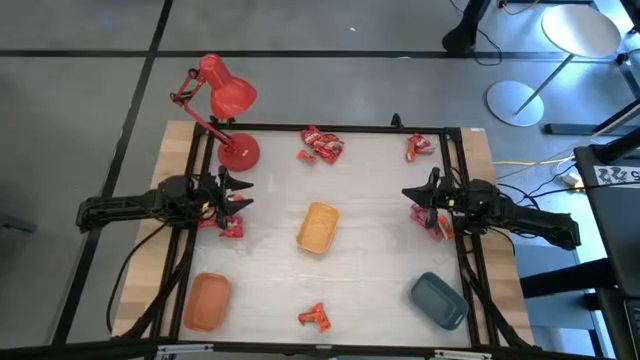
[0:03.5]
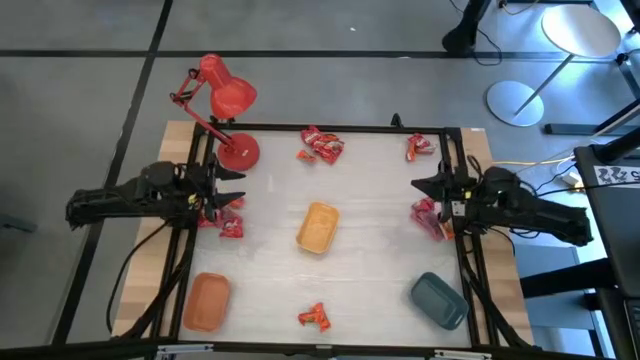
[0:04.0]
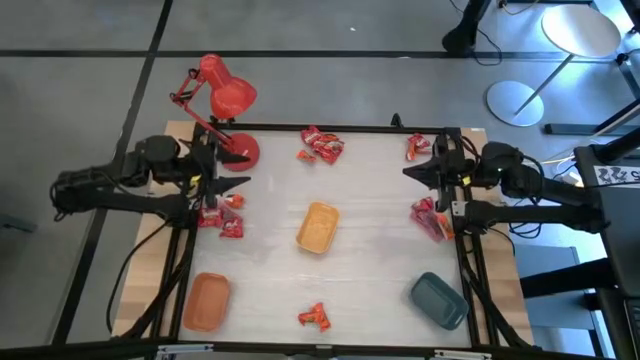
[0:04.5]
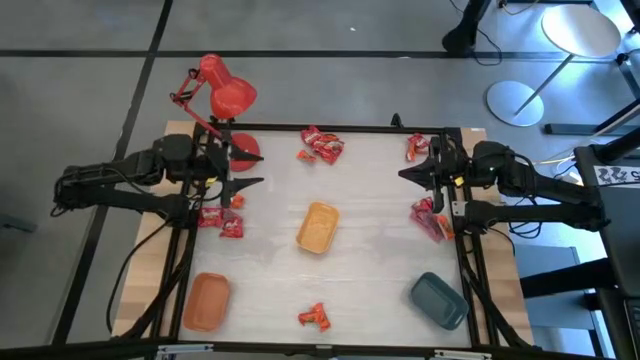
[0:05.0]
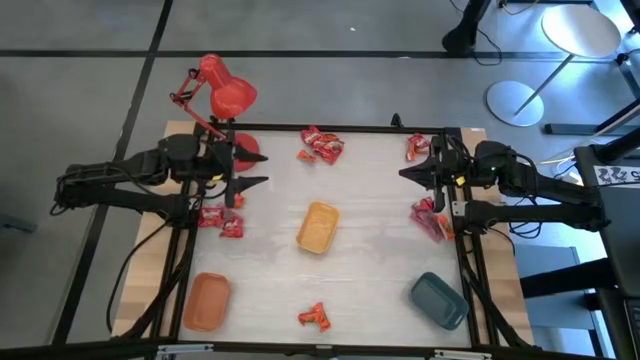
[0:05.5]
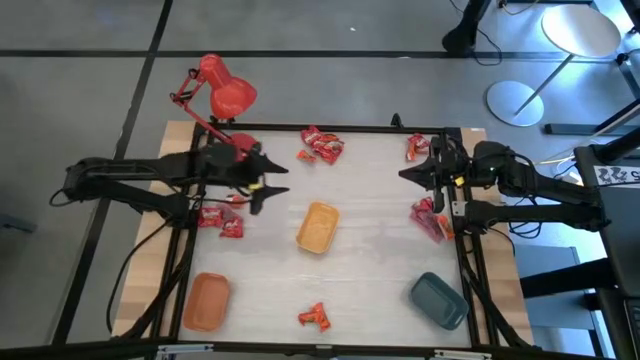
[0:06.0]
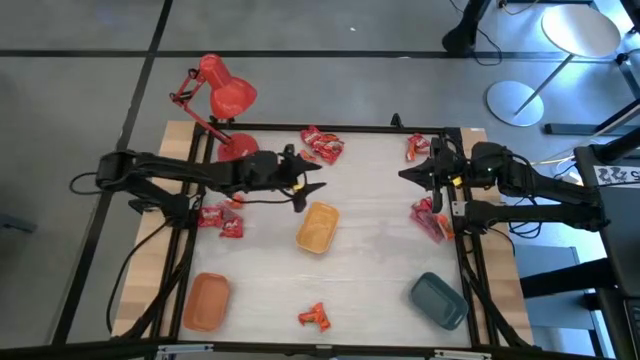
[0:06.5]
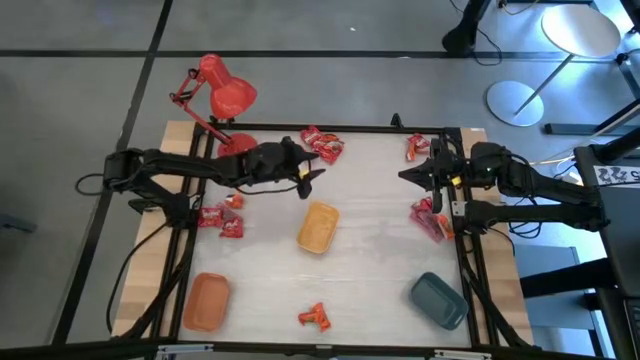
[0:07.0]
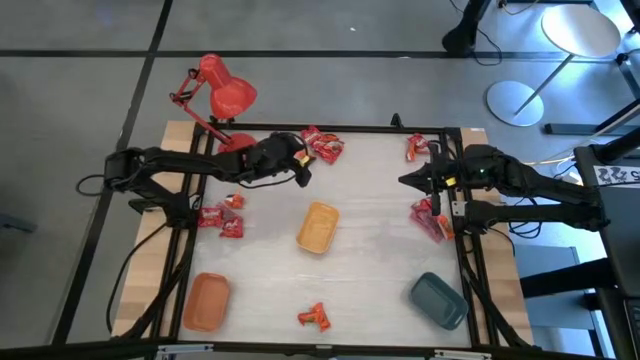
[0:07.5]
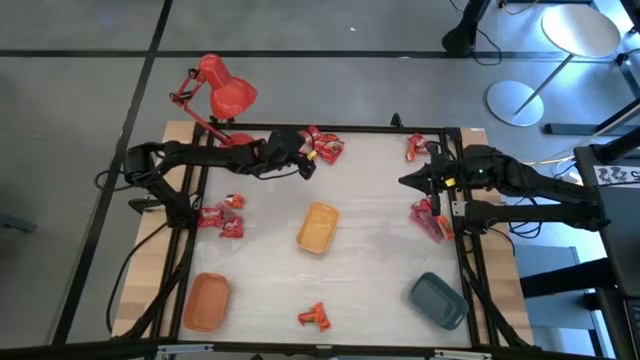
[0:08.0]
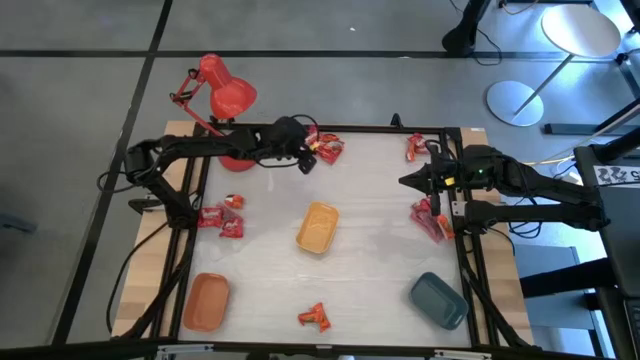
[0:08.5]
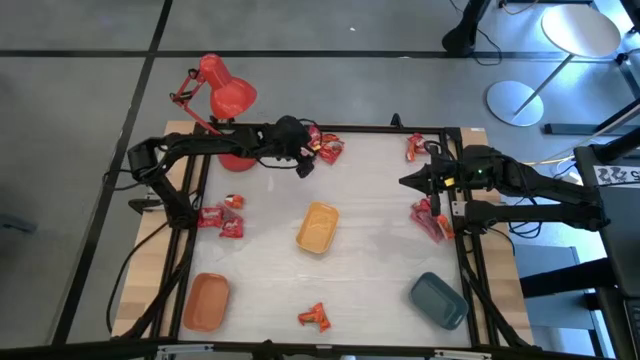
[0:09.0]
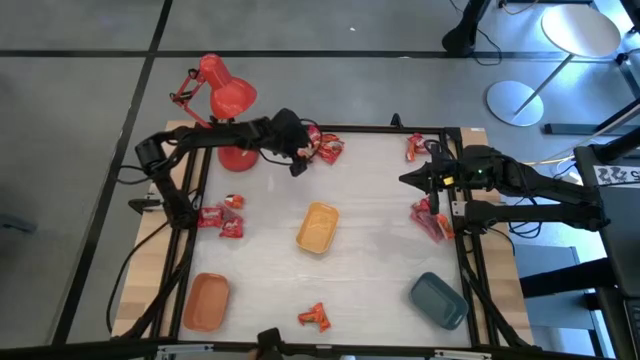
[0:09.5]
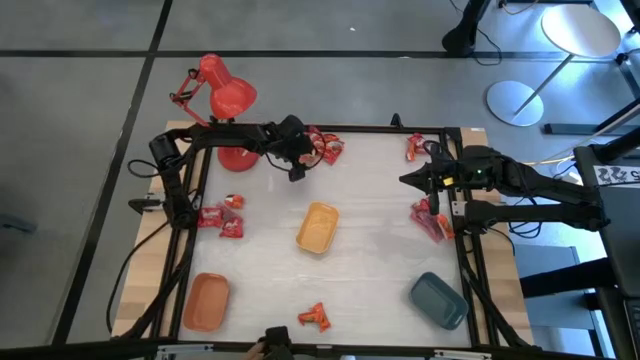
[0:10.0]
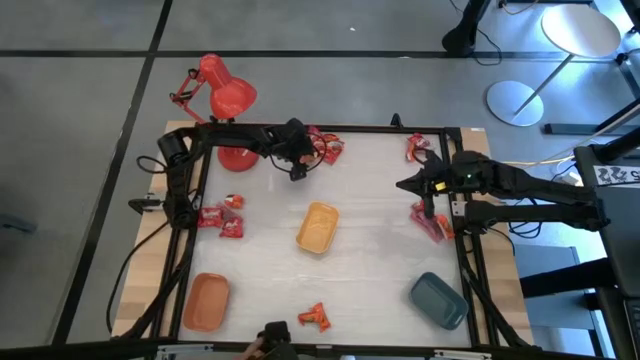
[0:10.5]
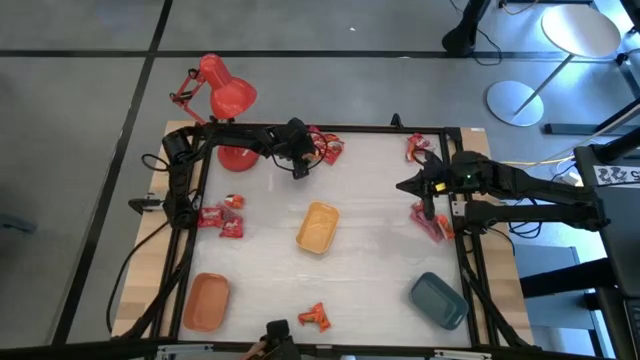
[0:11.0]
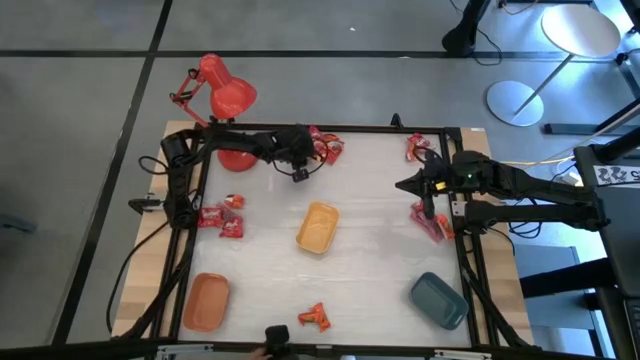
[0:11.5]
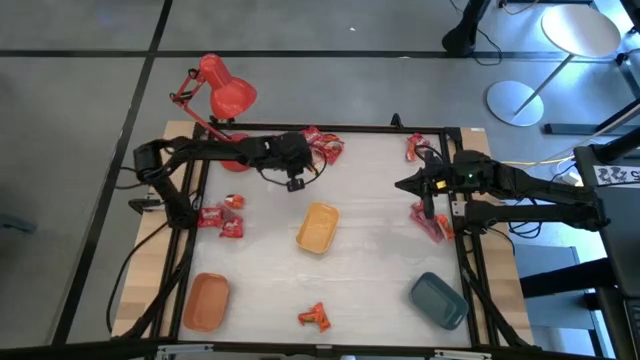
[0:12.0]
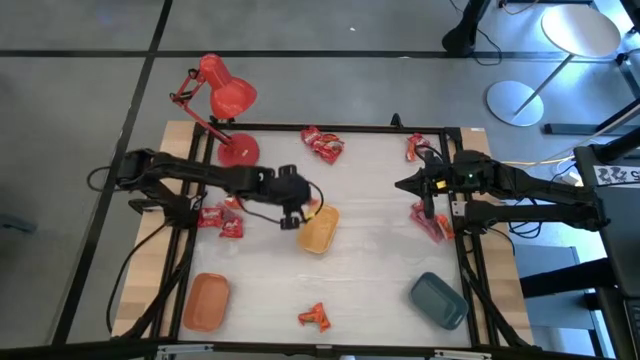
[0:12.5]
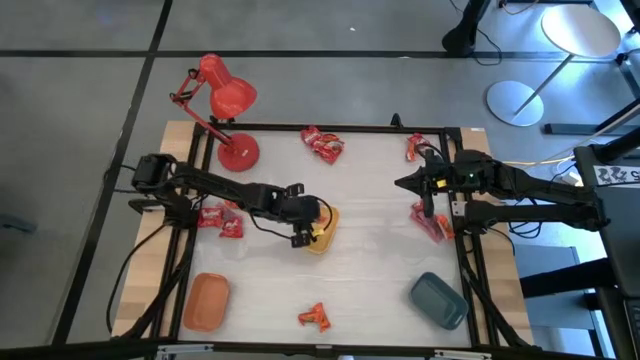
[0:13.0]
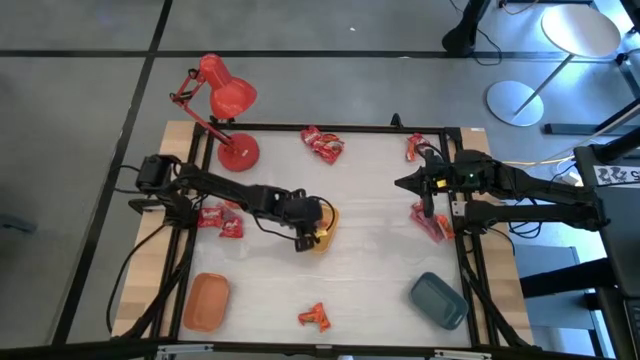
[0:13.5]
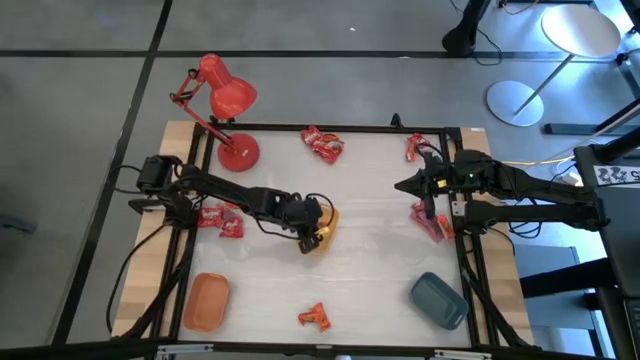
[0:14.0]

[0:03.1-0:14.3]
Task: Sort candy
Put the orange candy into the yellow bin

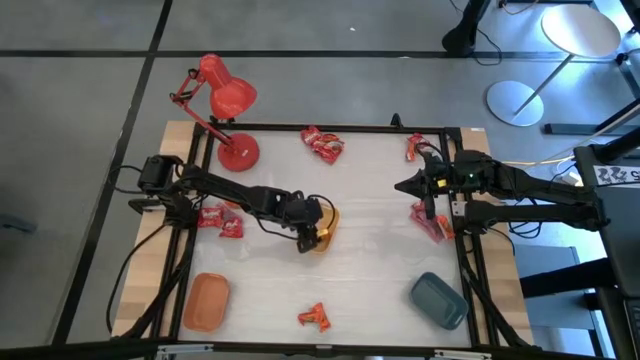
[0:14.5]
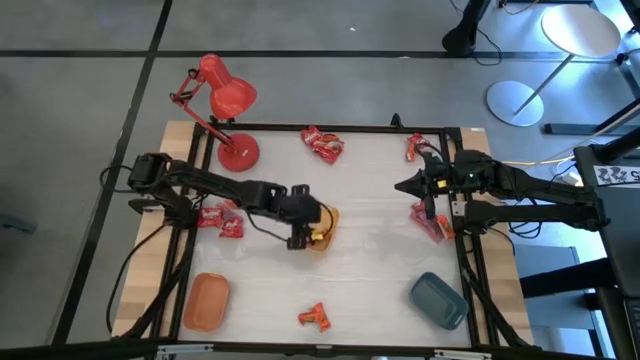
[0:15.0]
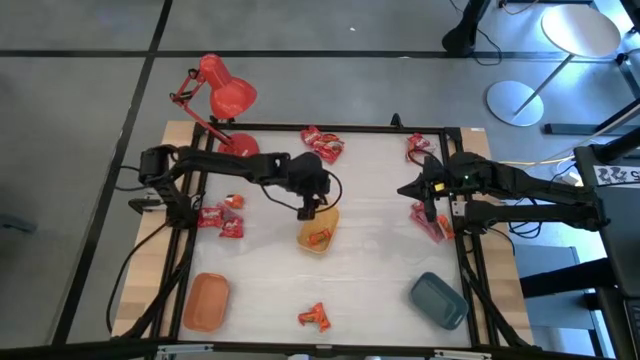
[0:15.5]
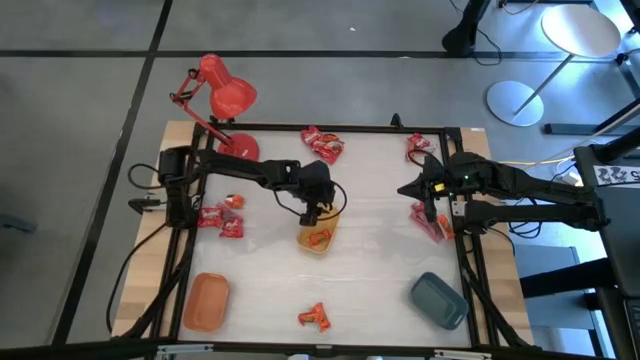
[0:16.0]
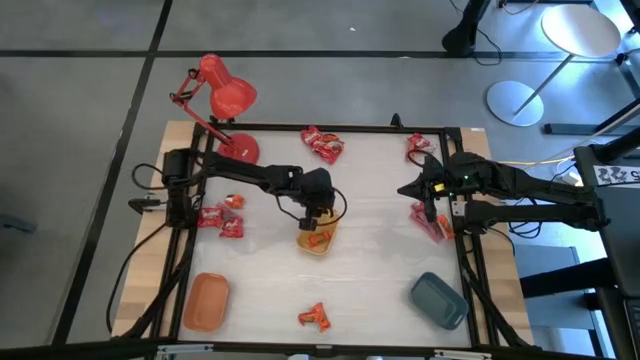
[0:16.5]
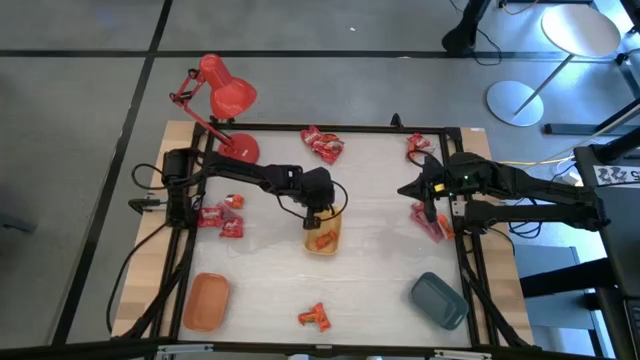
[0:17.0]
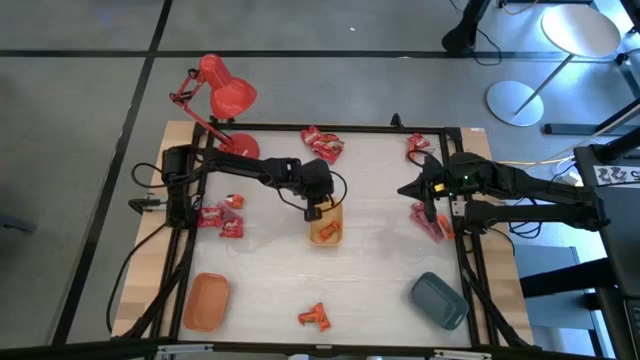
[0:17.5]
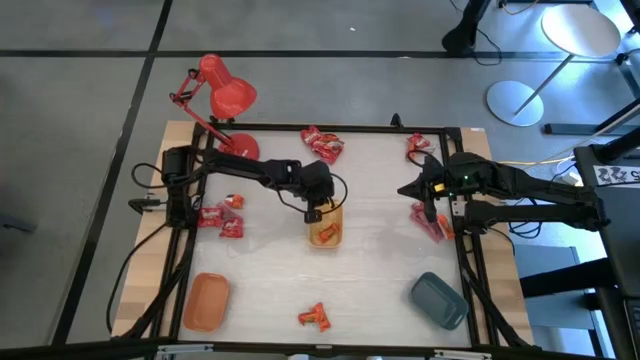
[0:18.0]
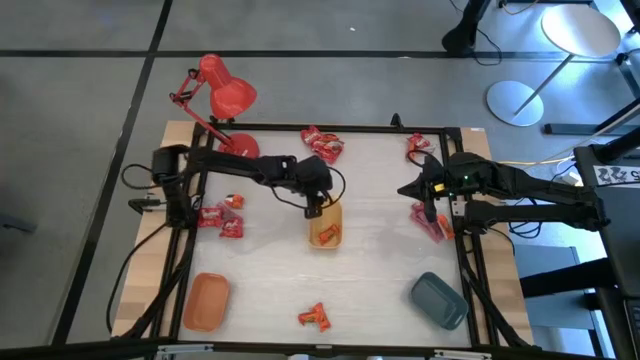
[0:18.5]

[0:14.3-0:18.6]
Adjust the yellow bin

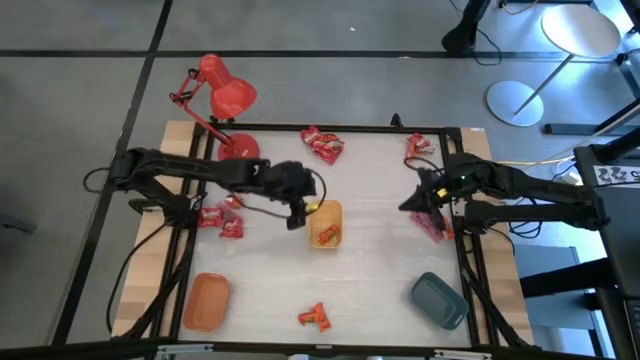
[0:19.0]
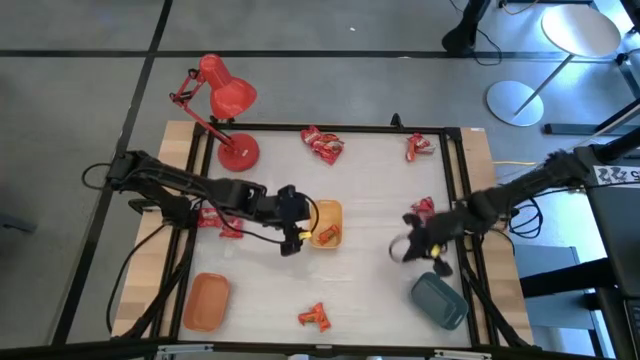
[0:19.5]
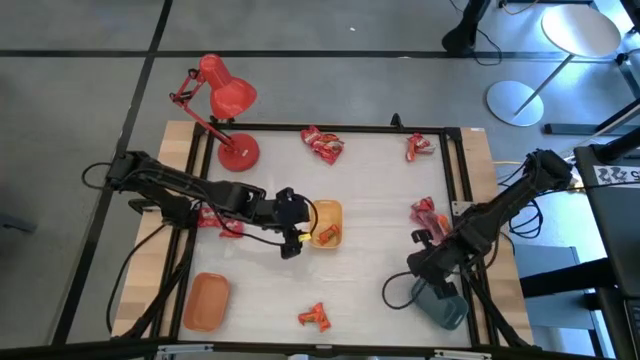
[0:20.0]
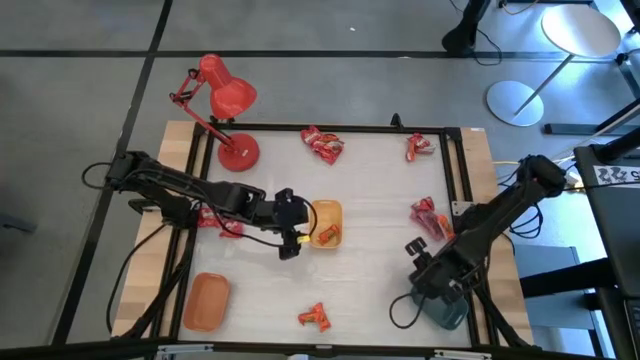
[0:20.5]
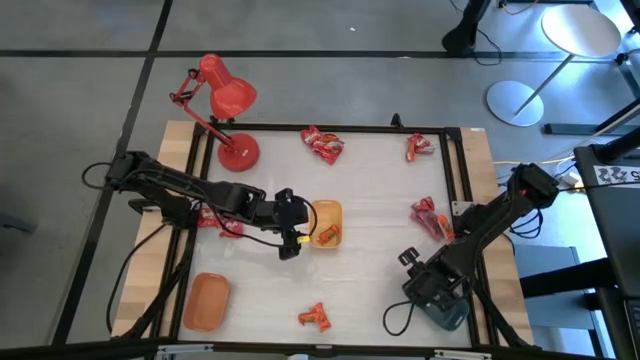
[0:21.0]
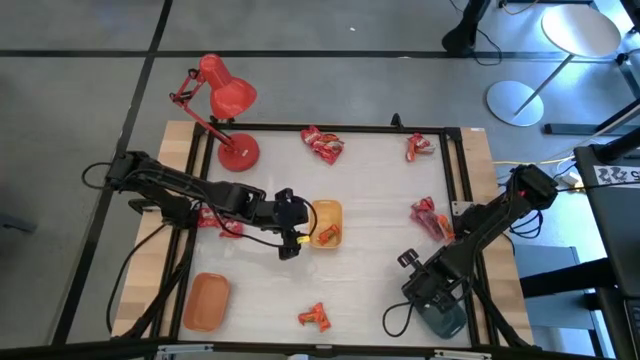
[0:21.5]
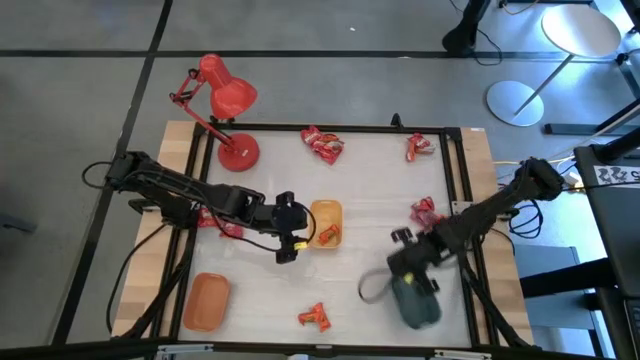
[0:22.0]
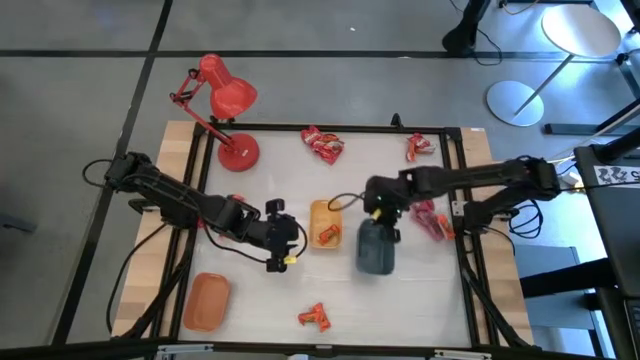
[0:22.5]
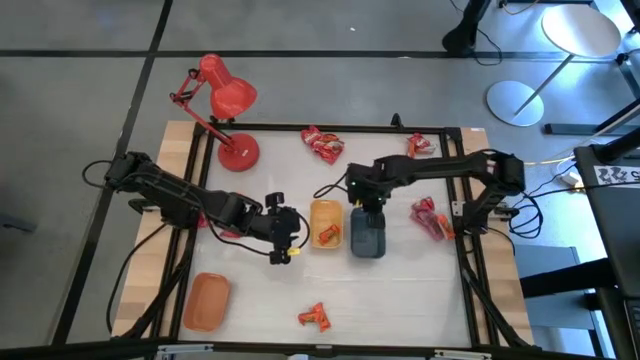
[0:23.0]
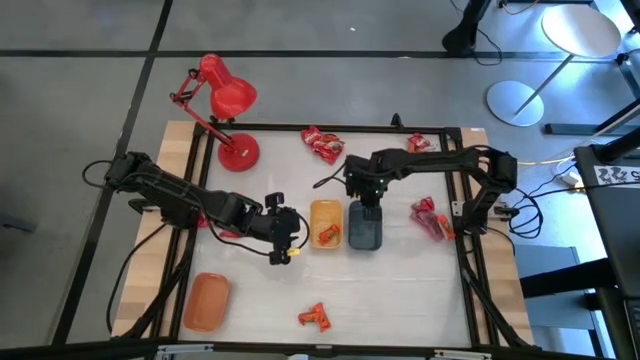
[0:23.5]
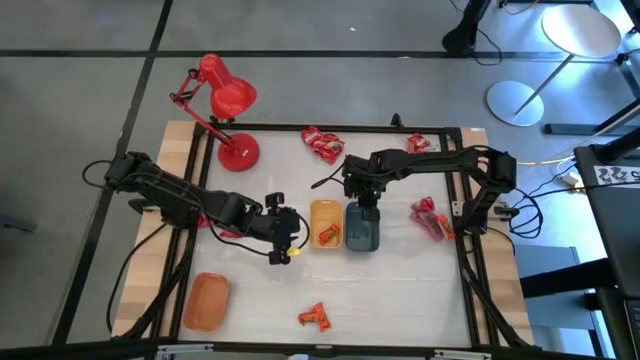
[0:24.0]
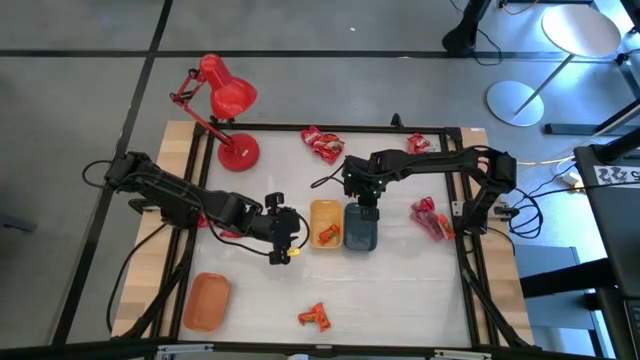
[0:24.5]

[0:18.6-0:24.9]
Move the blue bin to the center of the table

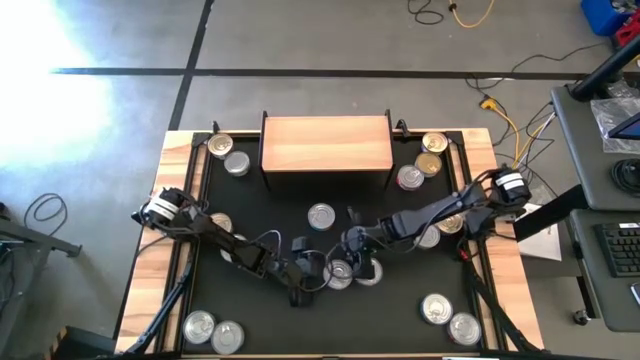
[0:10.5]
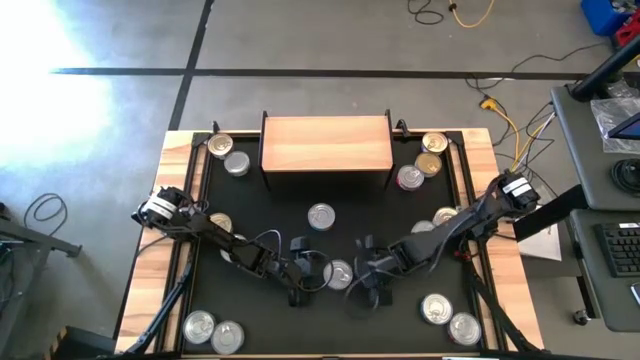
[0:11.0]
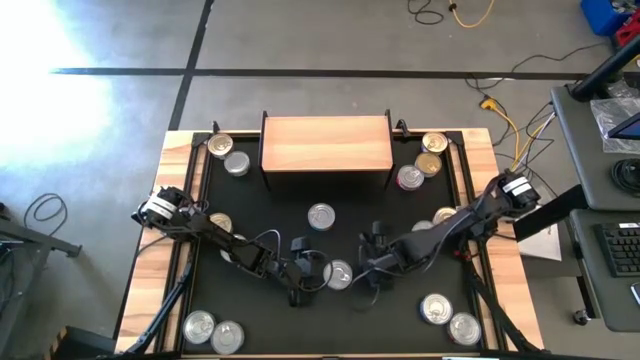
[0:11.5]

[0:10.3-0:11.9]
Task: Stack canned seafood by type on shelf
Move the top dark blue tuna can to the center
